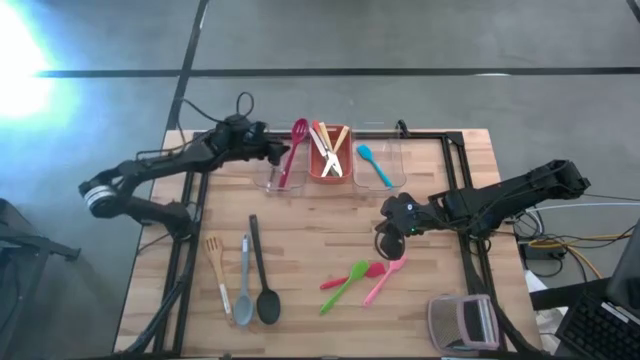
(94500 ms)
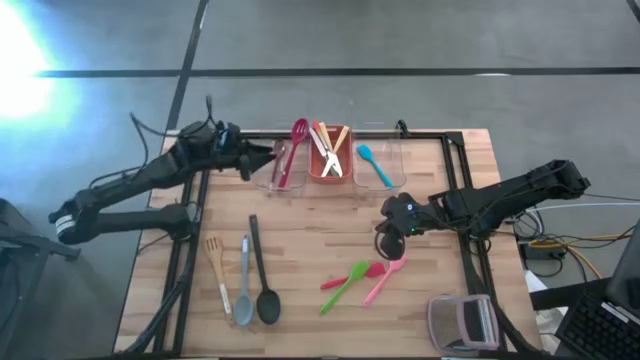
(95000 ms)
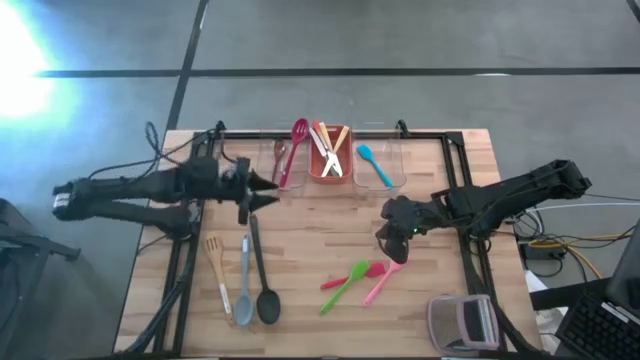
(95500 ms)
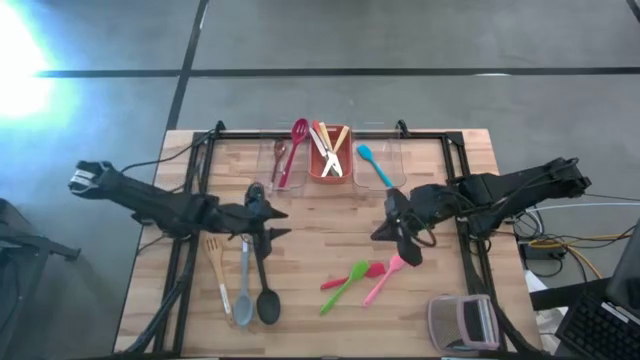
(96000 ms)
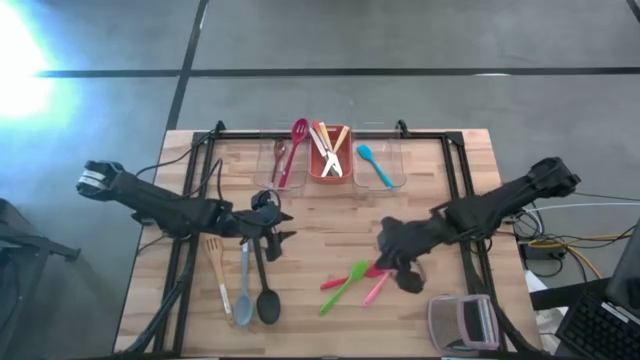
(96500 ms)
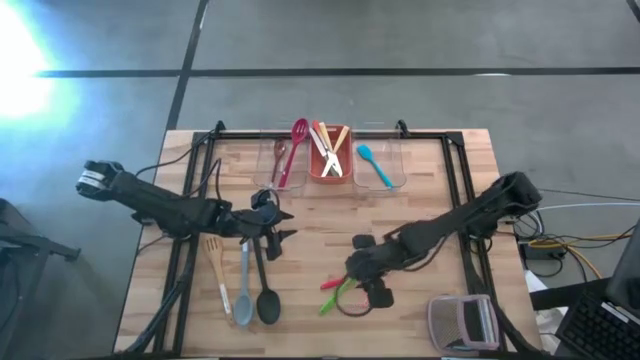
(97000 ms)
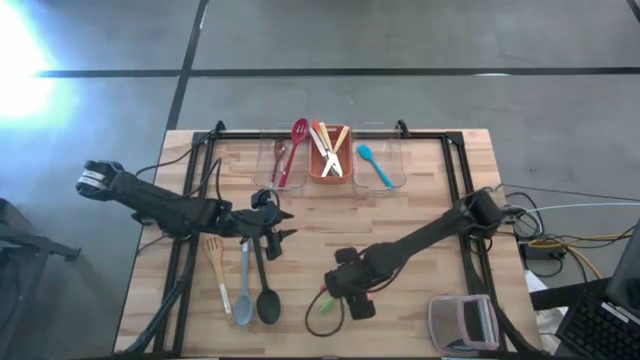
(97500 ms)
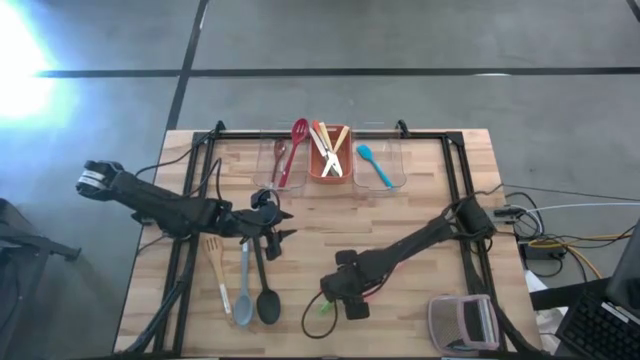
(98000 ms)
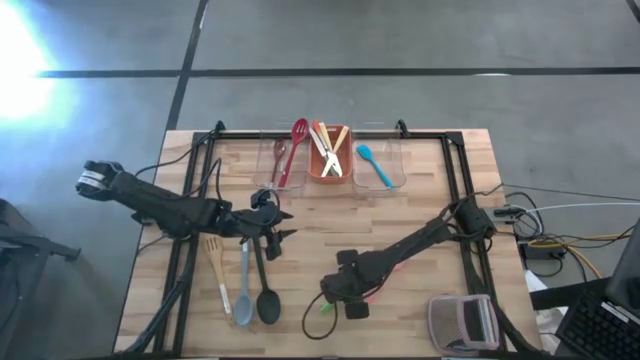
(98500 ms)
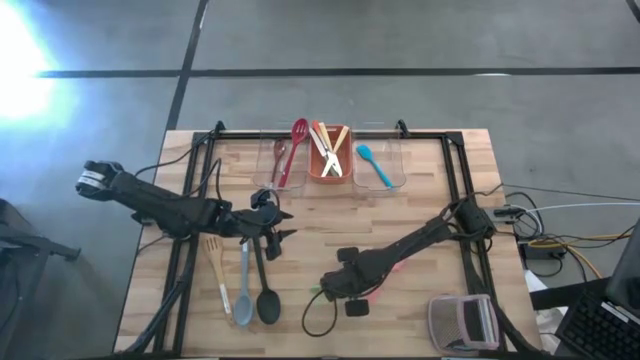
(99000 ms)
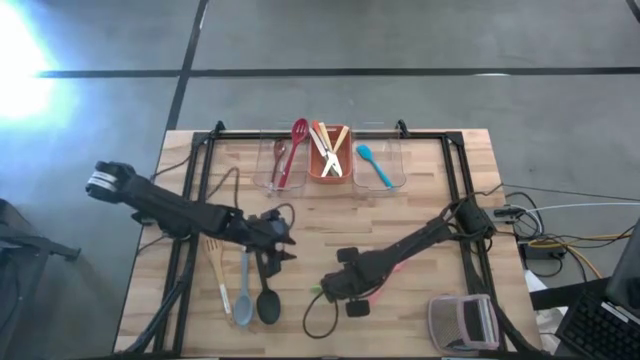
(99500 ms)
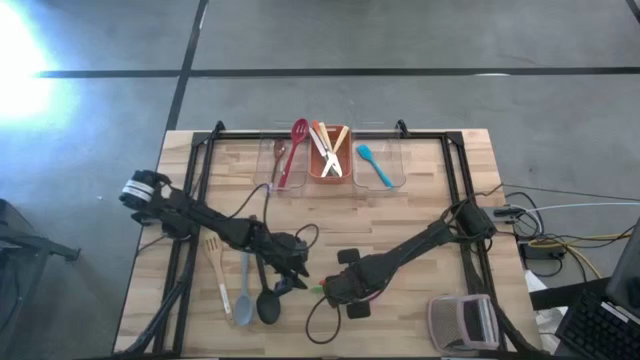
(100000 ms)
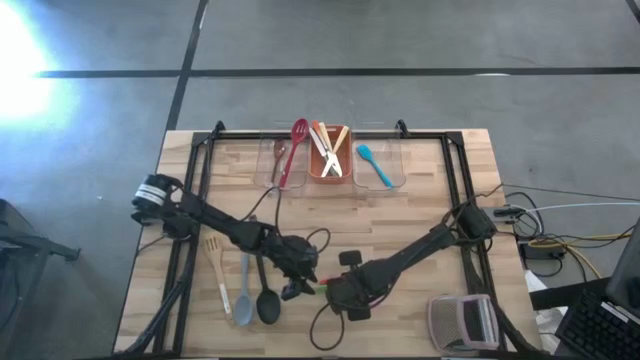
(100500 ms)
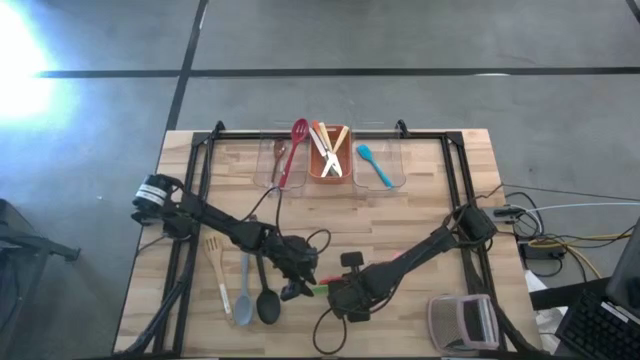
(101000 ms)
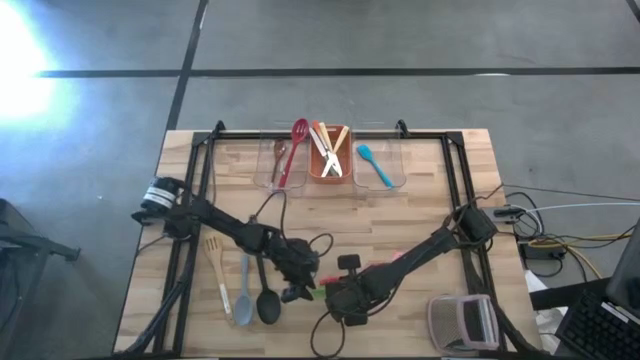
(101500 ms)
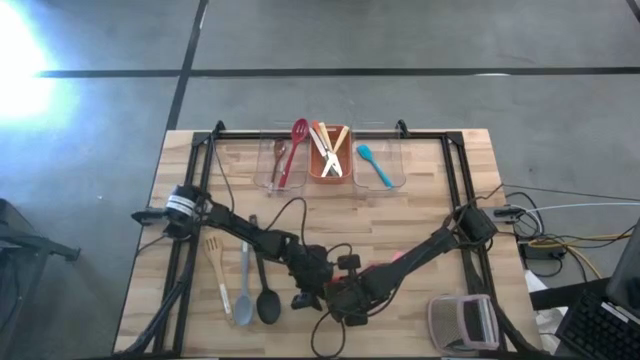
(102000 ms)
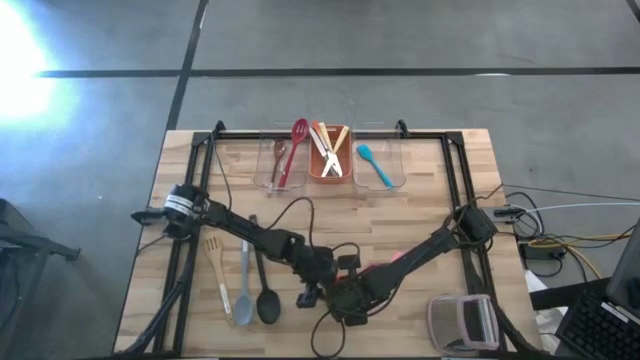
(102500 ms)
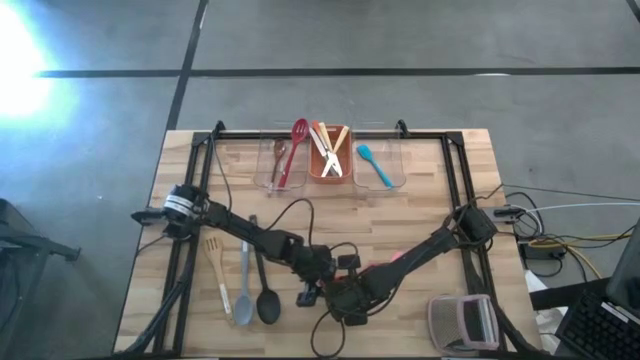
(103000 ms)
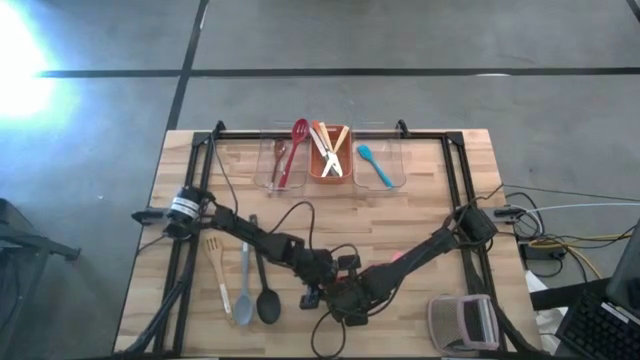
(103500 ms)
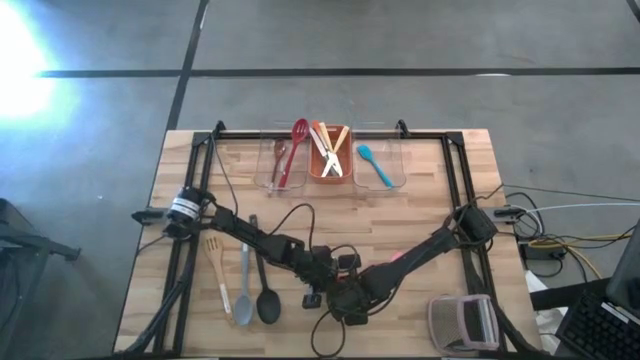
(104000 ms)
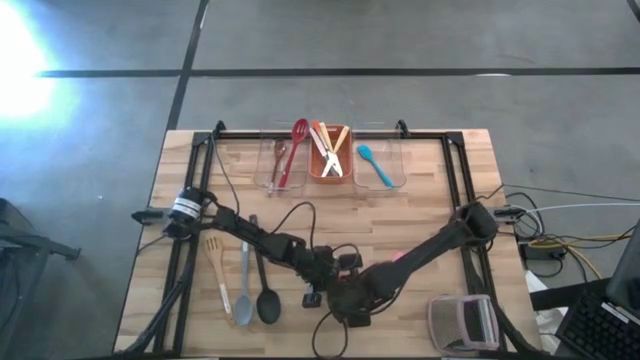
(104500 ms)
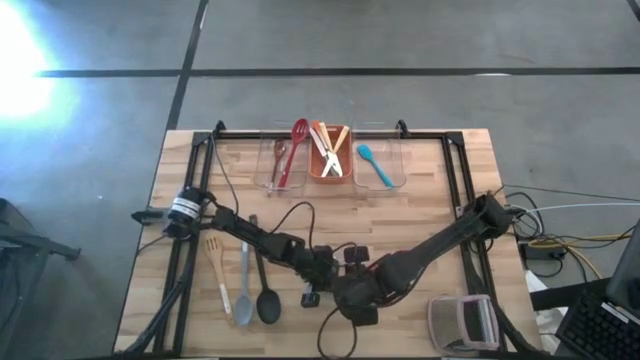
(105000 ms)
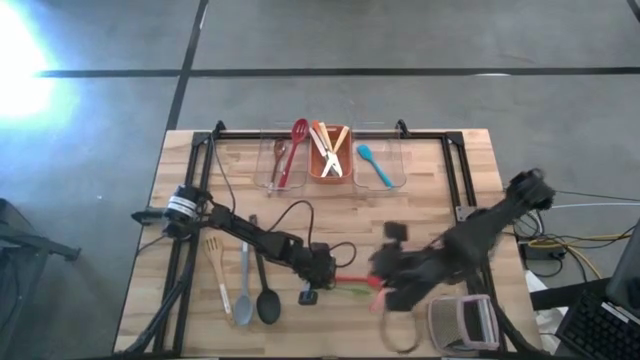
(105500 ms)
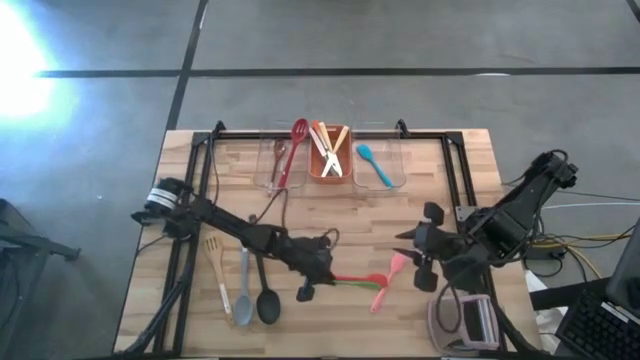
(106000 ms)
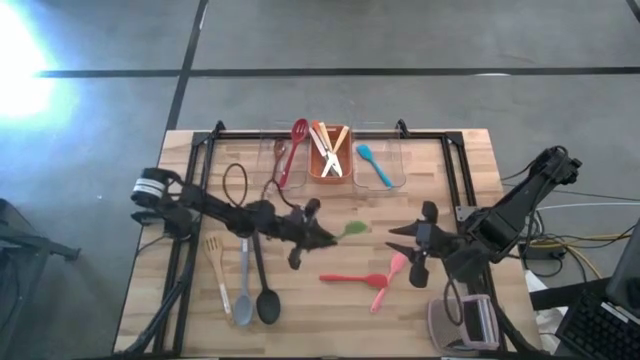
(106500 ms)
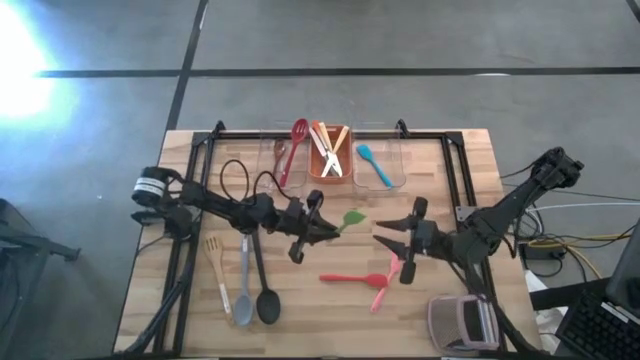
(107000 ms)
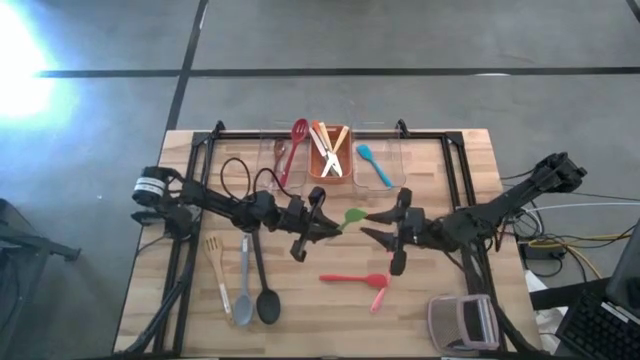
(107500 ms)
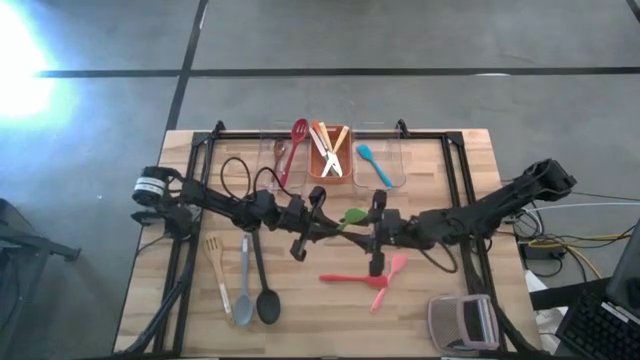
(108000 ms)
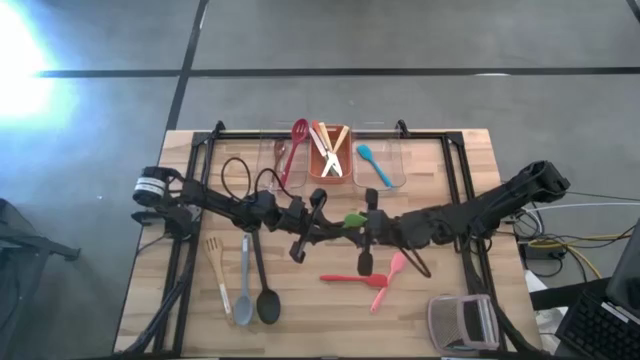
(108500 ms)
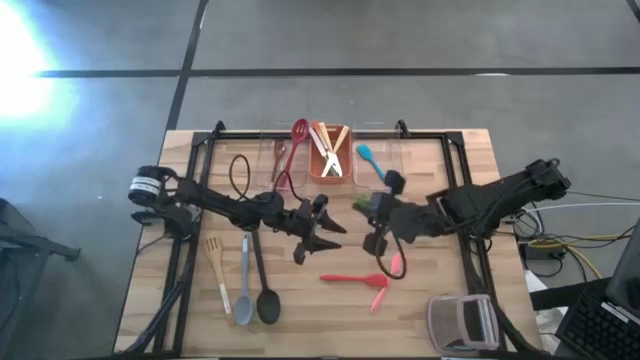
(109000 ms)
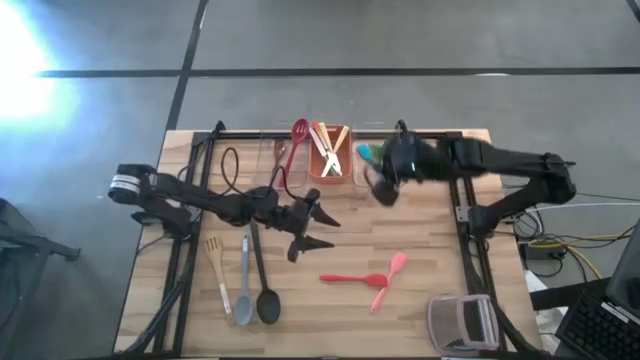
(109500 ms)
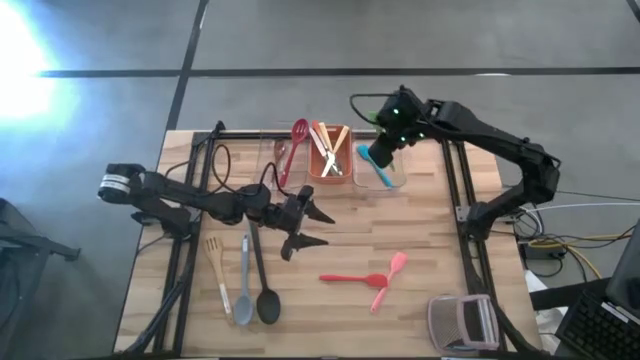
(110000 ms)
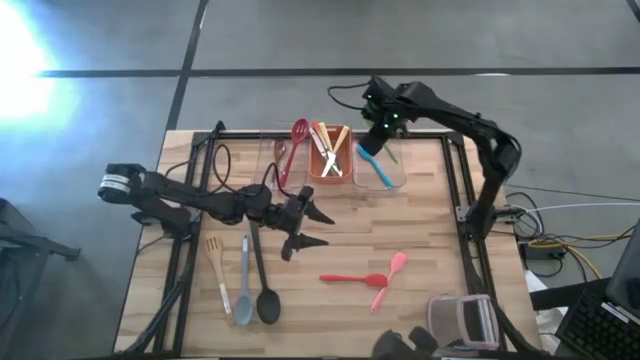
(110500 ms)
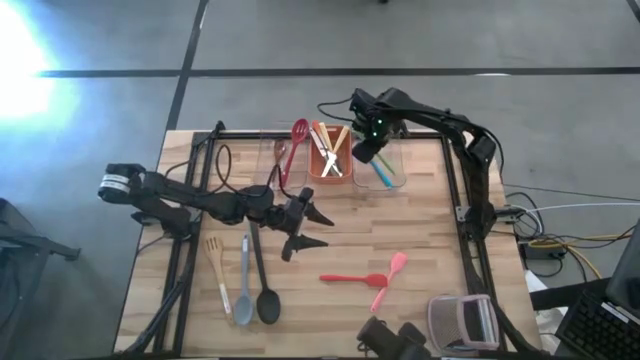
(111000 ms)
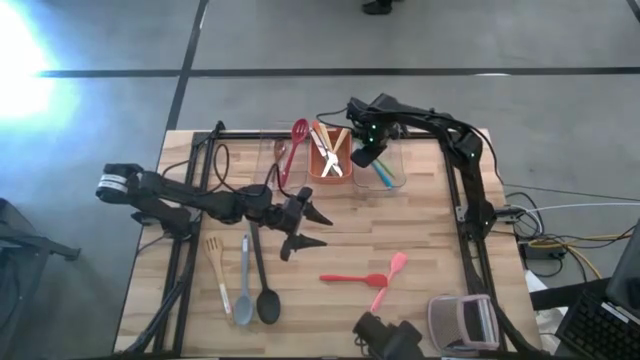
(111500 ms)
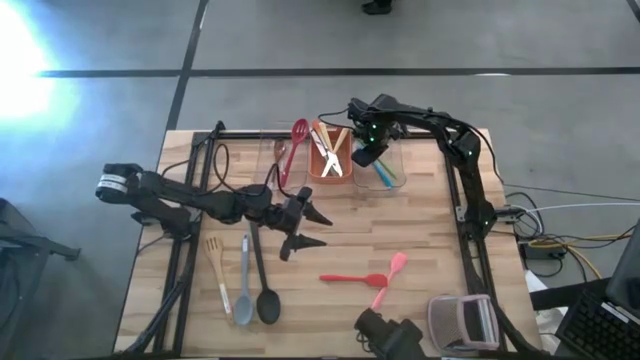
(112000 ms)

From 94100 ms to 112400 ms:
Task: Pick & Place Kitchen Items
Put the green spatula into the right transparent bin

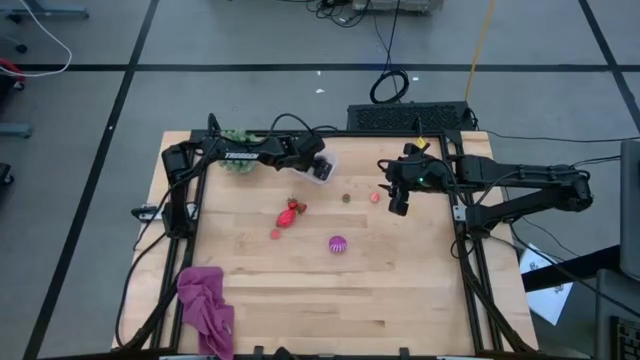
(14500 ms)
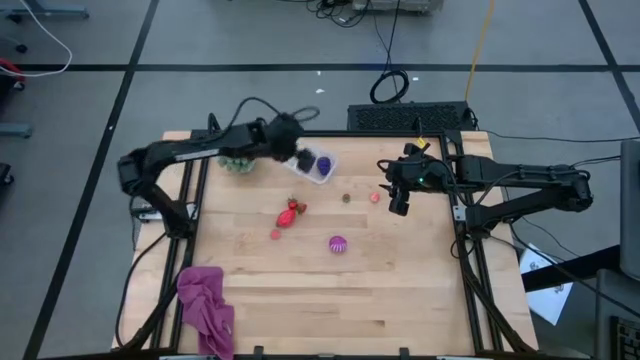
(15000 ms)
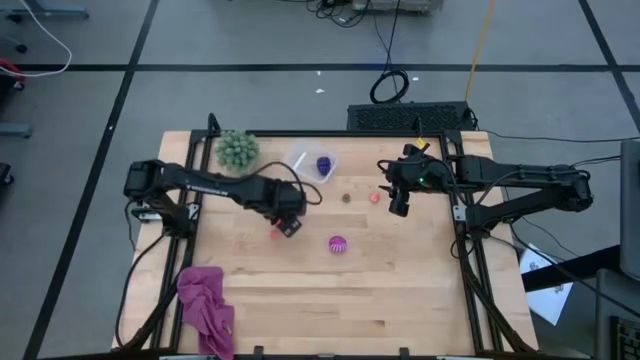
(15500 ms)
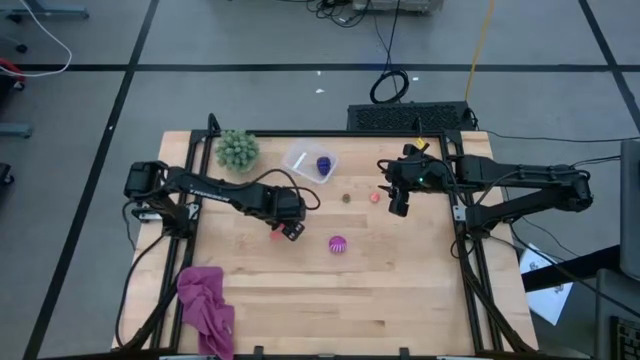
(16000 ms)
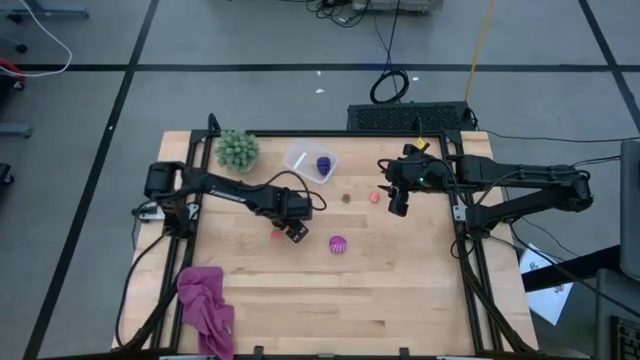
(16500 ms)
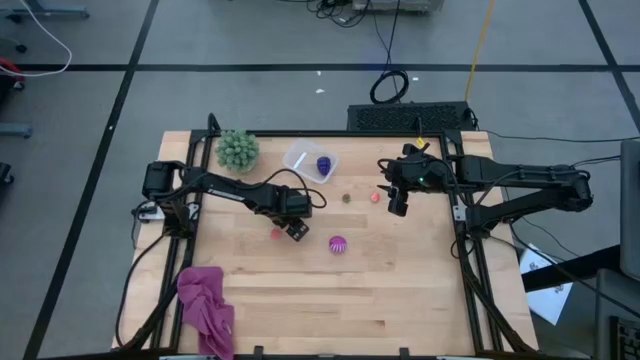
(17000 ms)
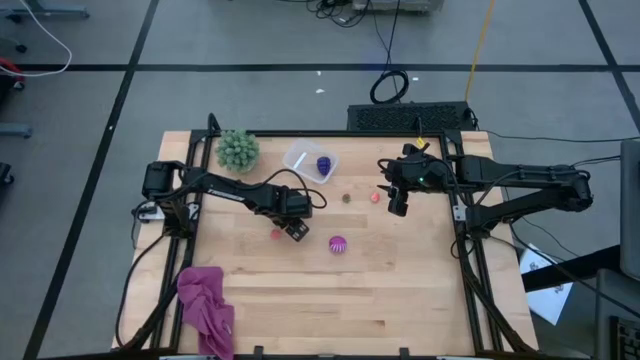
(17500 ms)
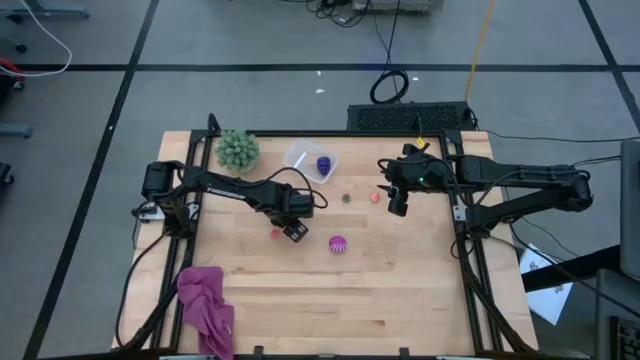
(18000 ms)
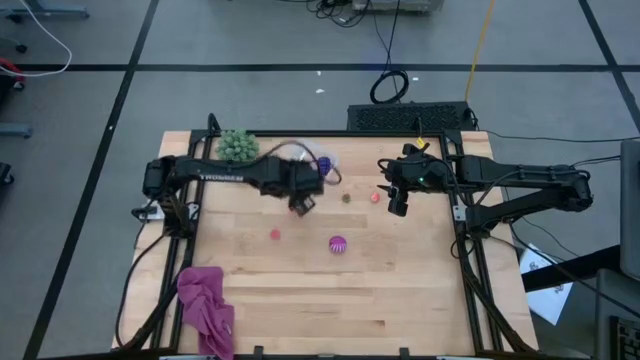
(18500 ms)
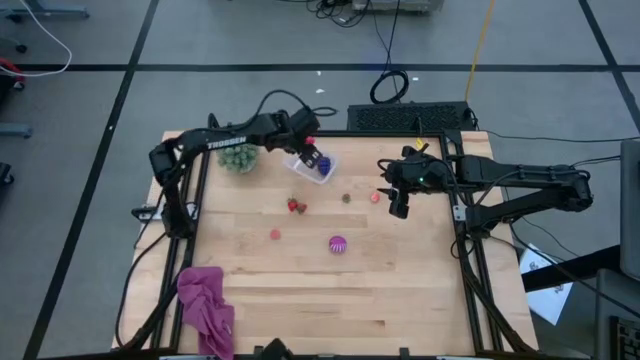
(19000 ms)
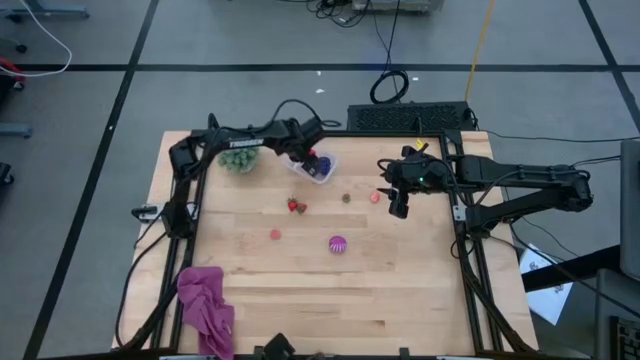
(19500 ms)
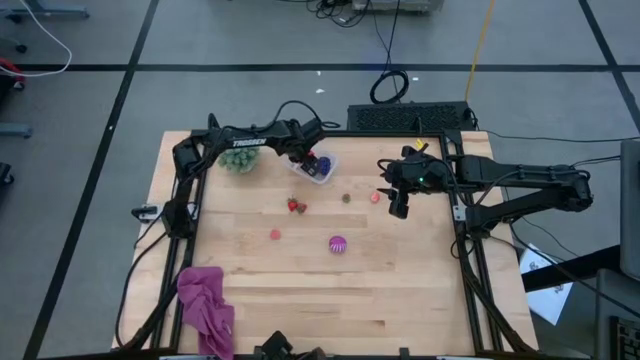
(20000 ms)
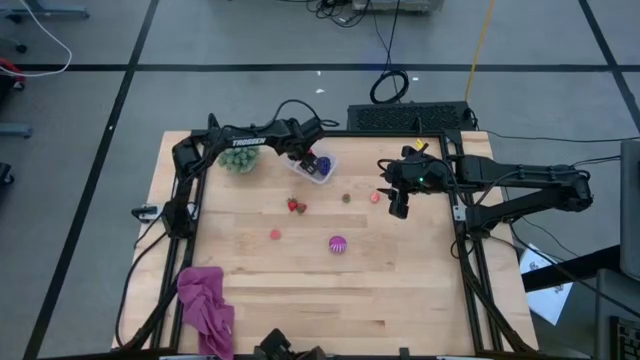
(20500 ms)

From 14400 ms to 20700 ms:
Task: Pick and placing Produce into tupperware
Put the red dragon fruit into the transparent bin
